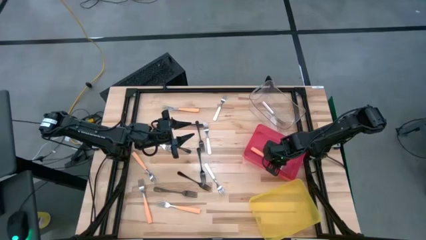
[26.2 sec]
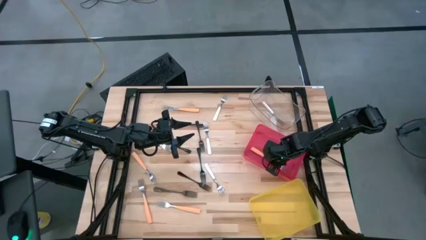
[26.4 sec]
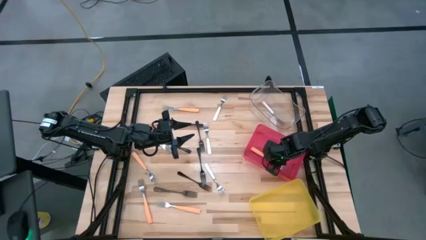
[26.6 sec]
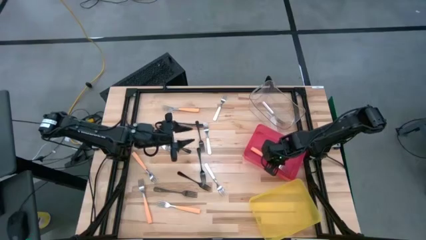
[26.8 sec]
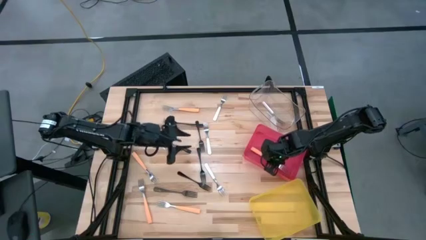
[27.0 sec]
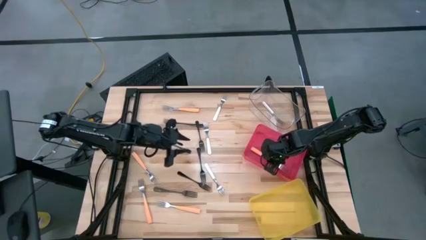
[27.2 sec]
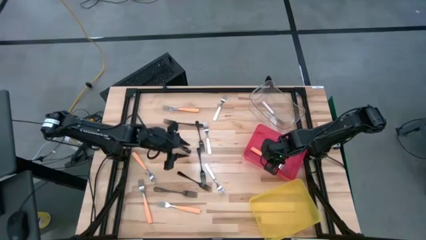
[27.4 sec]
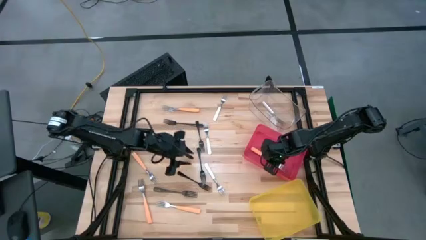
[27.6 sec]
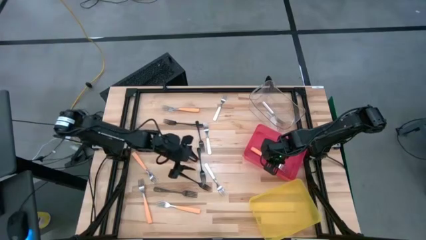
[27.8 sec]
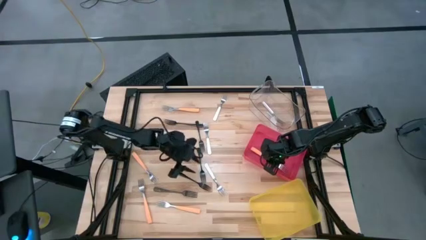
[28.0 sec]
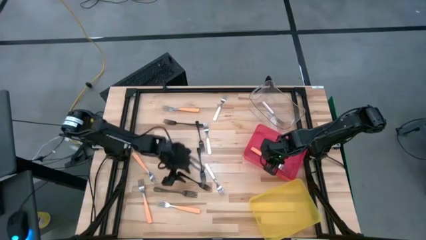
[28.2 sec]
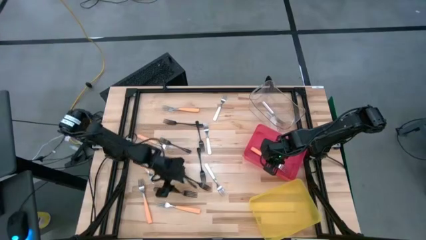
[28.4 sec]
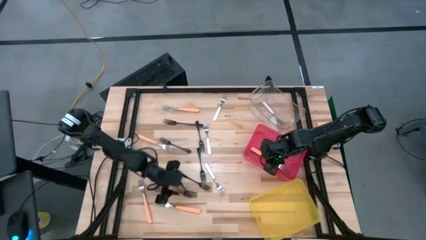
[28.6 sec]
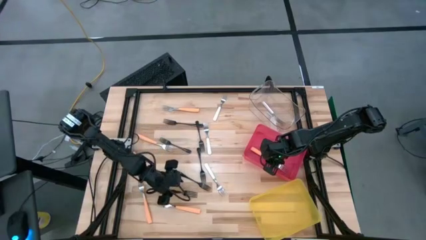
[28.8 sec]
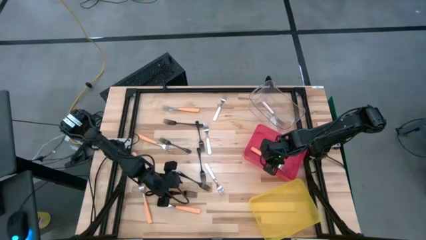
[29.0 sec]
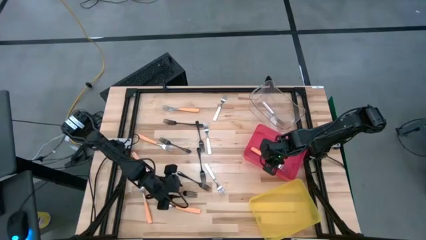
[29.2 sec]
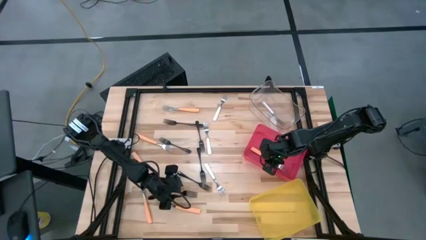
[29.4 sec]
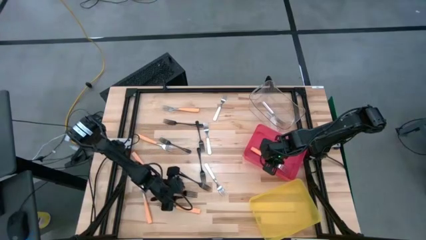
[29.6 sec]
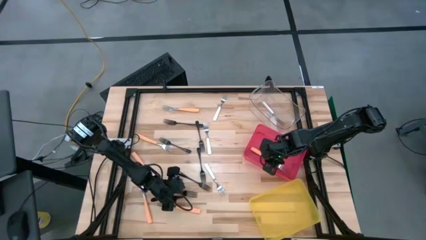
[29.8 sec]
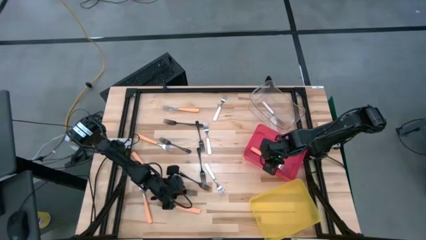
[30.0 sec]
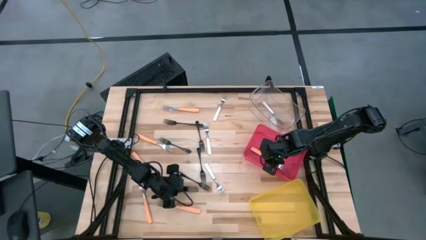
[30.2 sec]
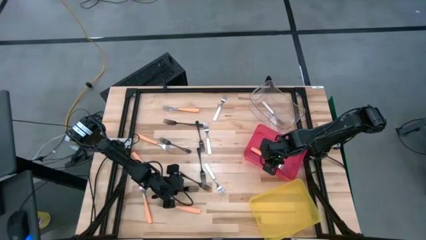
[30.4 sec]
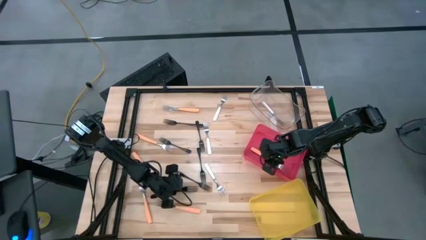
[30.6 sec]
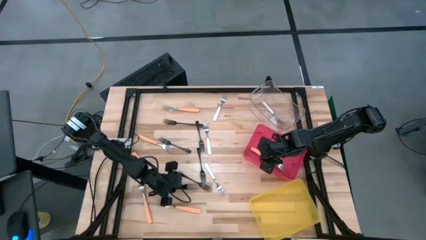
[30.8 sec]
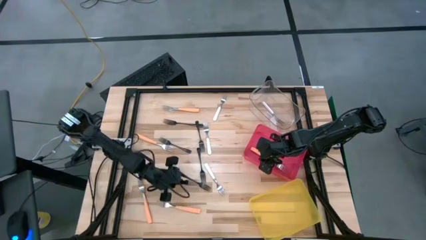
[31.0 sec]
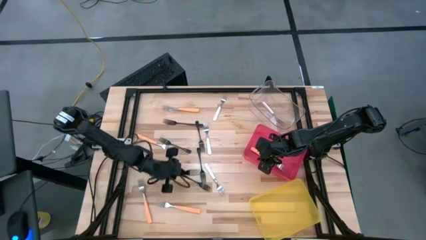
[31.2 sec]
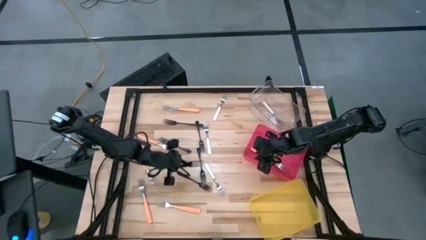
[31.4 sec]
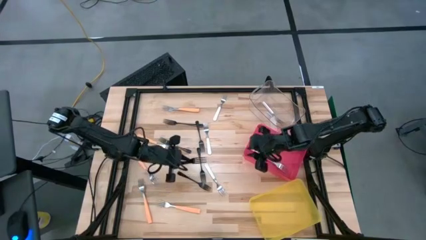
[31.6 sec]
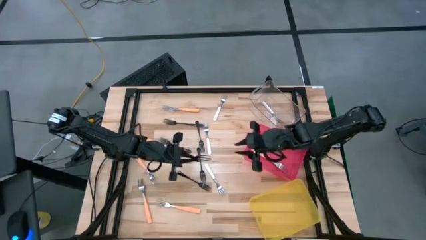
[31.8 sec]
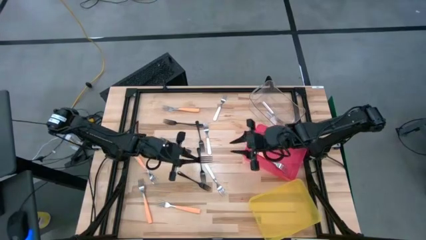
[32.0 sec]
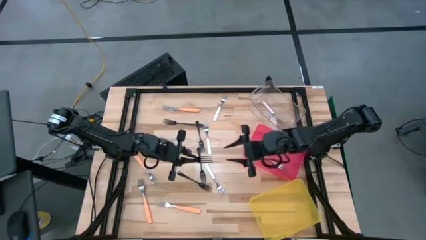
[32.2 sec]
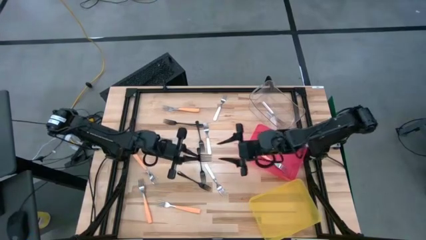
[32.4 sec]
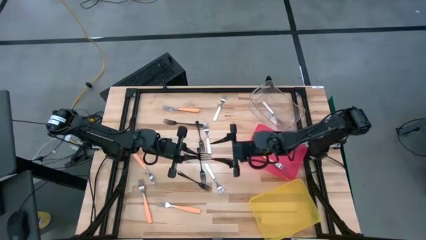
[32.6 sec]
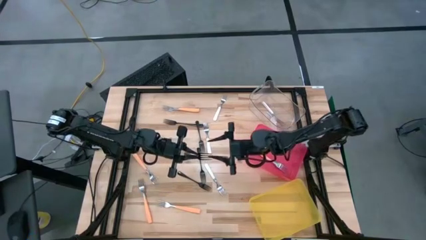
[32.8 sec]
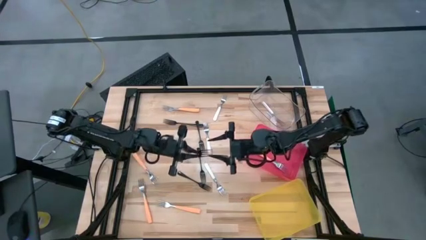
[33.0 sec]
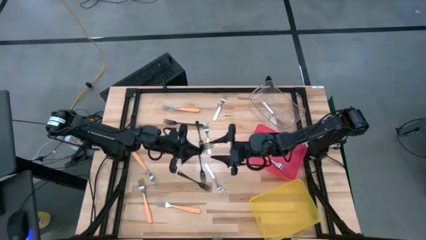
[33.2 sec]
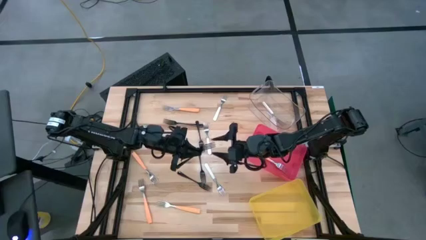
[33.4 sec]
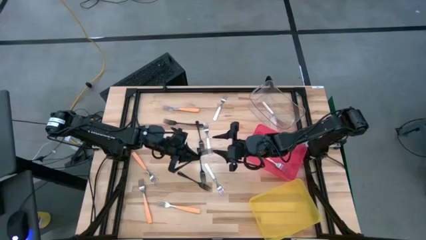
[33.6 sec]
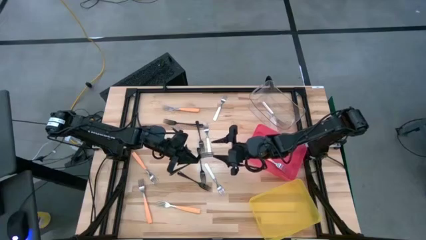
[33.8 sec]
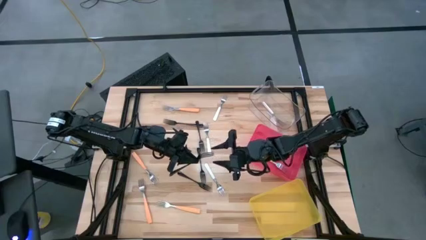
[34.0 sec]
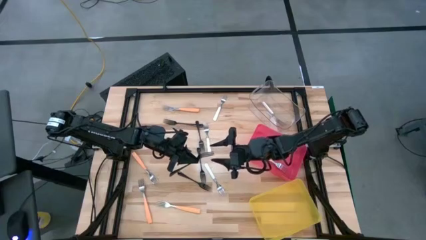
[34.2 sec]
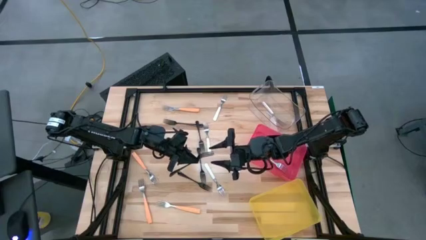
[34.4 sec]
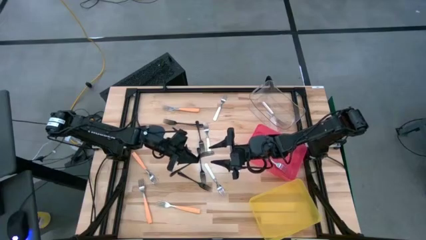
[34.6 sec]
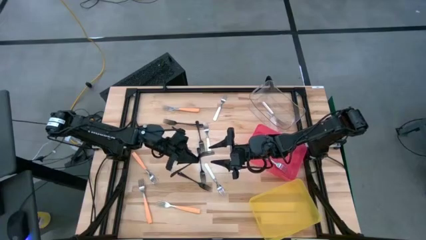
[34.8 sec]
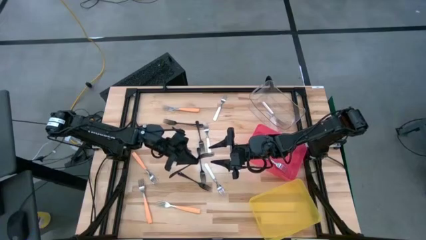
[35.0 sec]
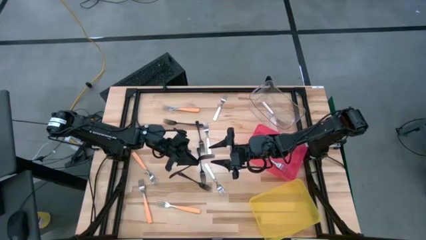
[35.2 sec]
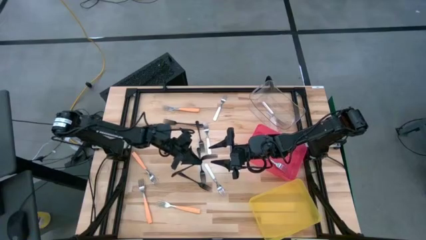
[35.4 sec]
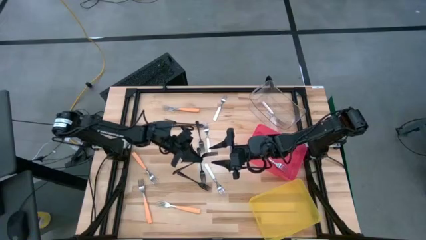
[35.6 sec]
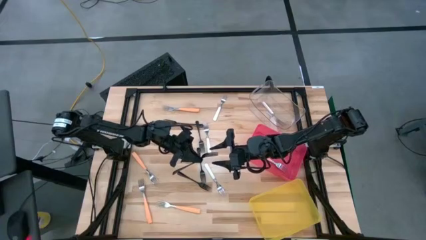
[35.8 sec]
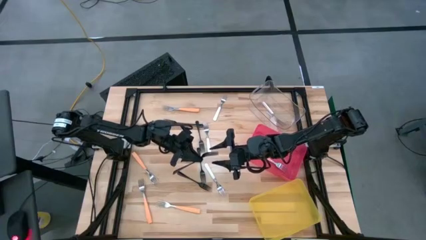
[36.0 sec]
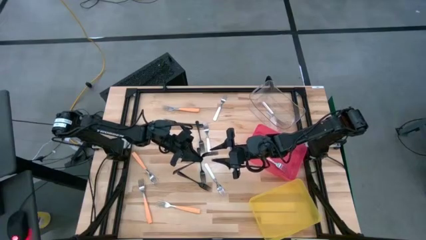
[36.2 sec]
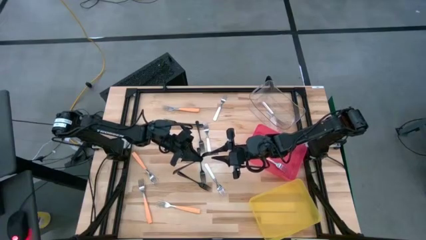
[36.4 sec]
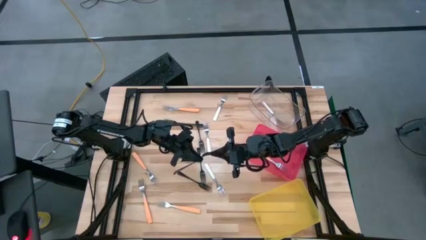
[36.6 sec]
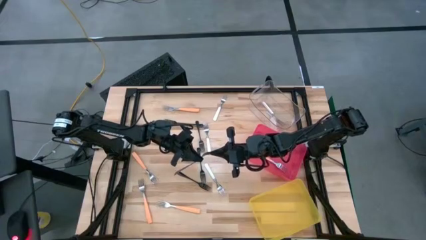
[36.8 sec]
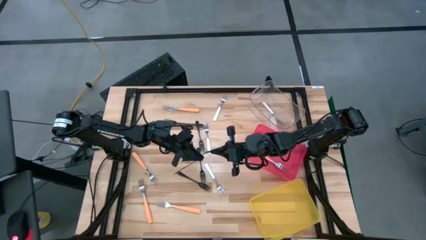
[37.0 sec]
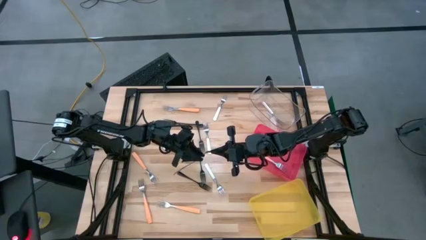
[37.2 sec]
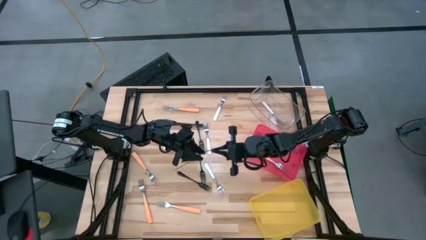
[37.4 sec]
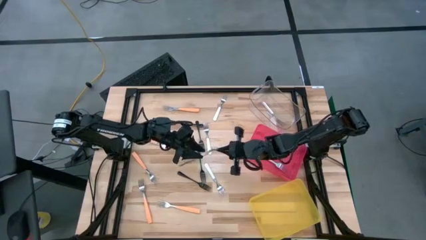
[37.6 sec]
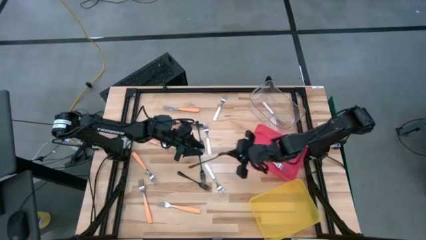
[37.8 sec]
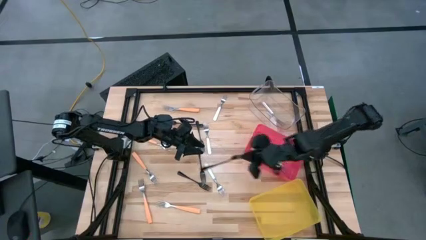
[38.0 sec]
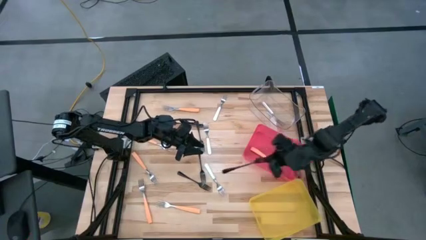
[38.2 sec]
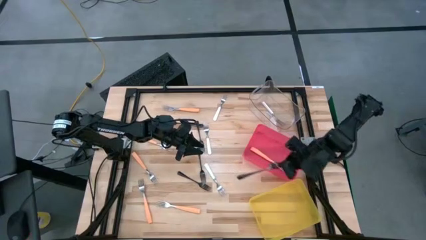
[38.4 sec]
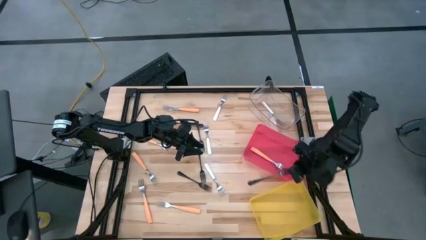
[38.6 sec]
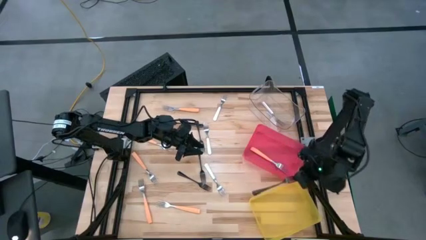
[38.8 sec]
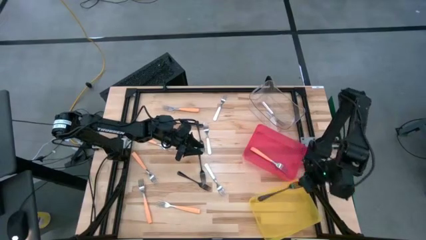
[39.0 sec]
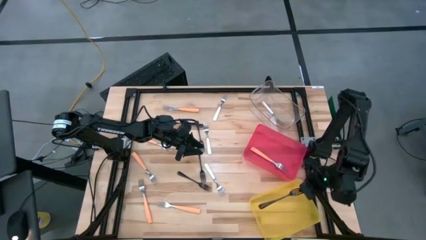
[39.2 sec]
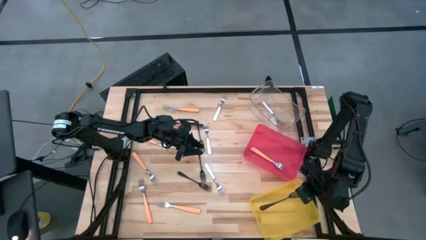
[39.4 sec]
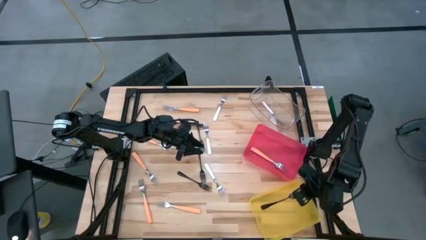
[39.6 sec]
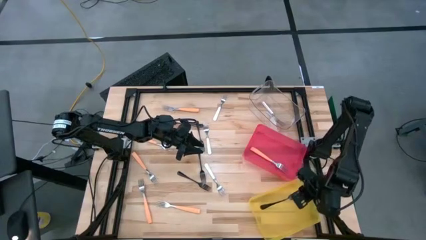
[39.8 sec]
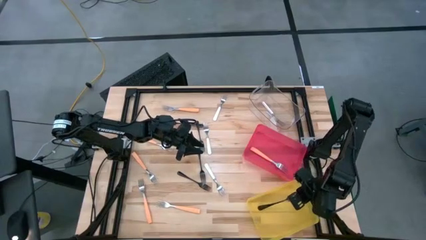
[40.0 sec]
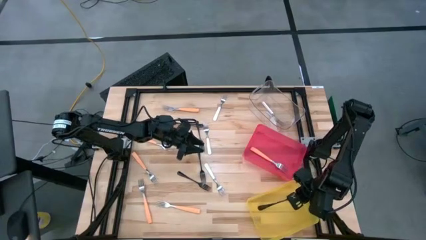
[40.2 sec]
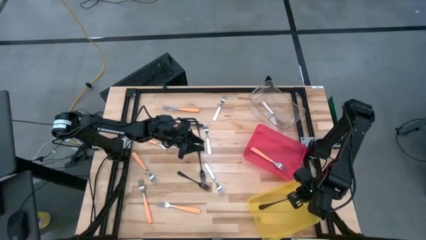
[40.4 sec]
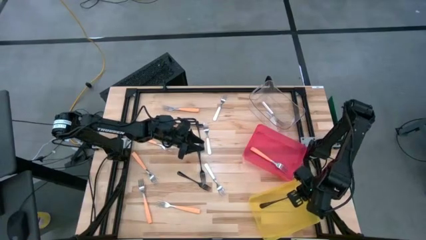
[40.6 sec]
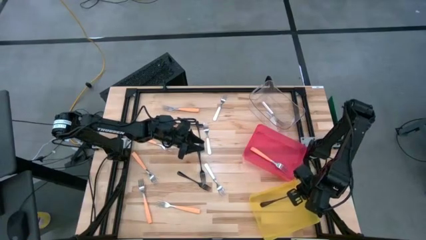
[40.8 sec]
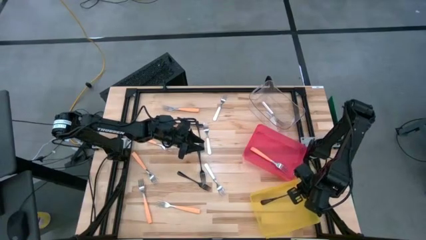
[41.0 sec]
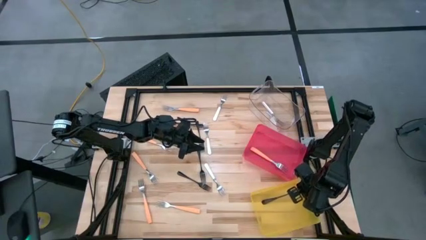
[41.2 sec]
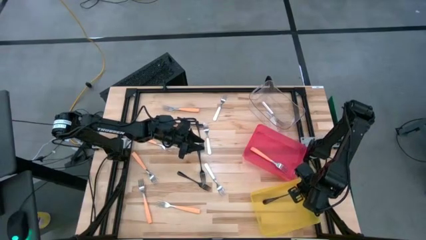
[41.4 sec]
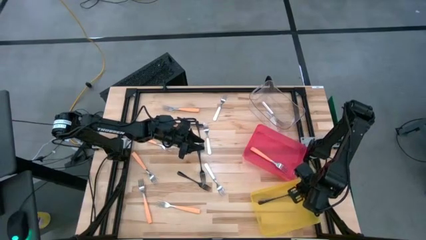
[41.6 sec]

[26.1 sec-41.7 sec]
Task: Sort silverware by color (type)
Put the black fork into the yellow bin
